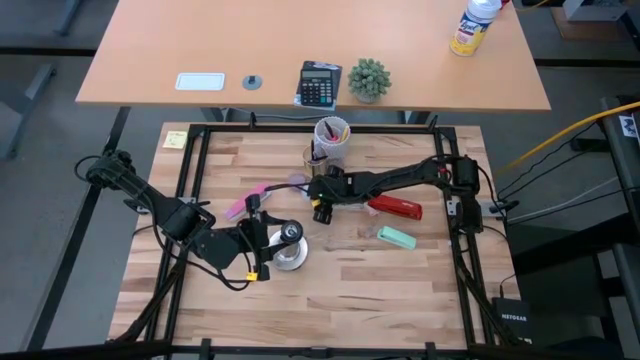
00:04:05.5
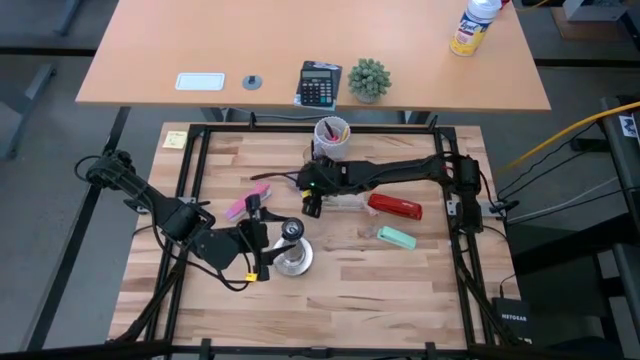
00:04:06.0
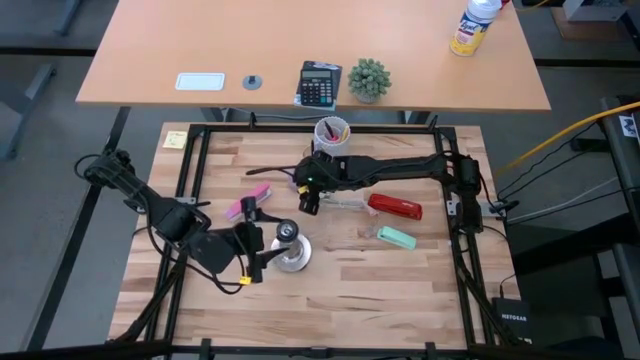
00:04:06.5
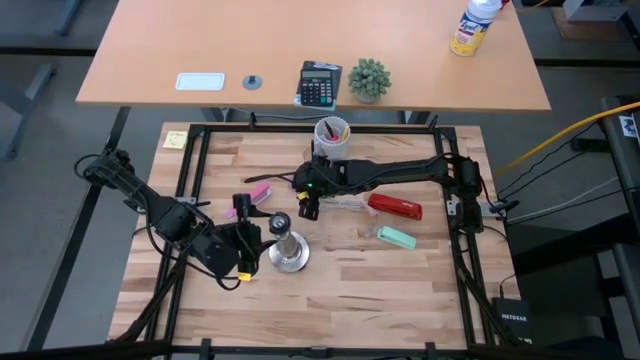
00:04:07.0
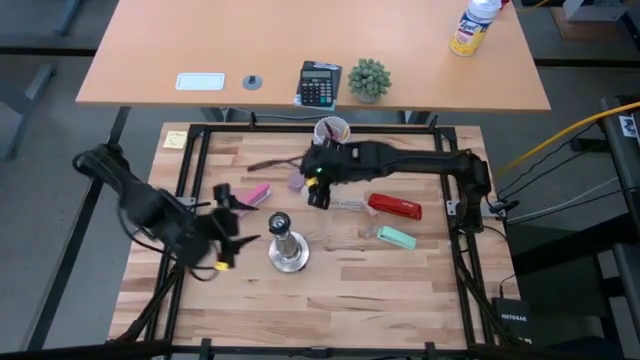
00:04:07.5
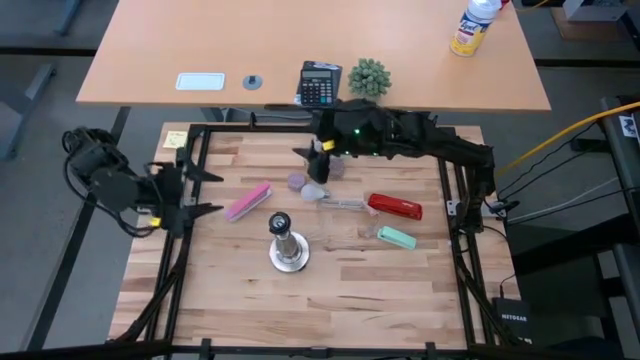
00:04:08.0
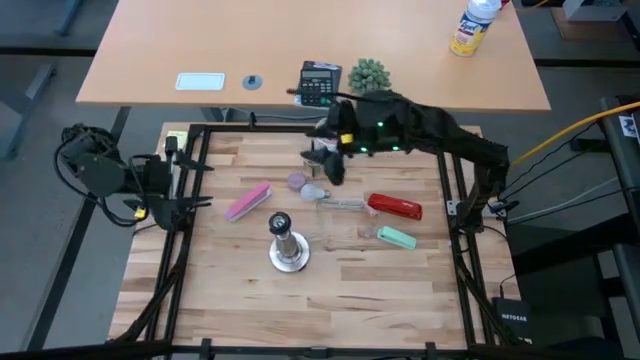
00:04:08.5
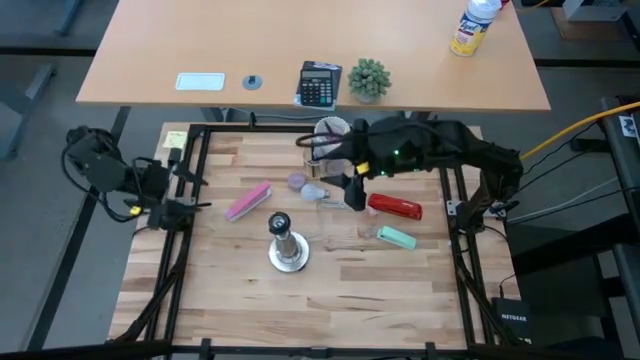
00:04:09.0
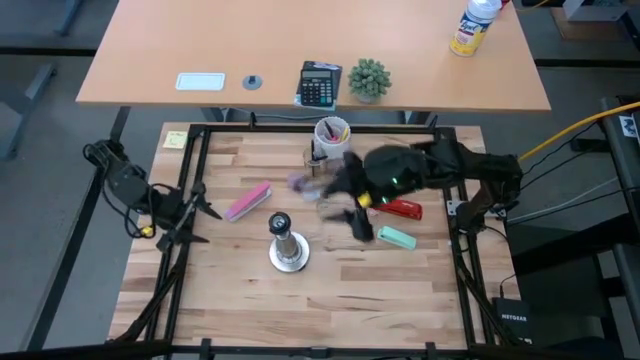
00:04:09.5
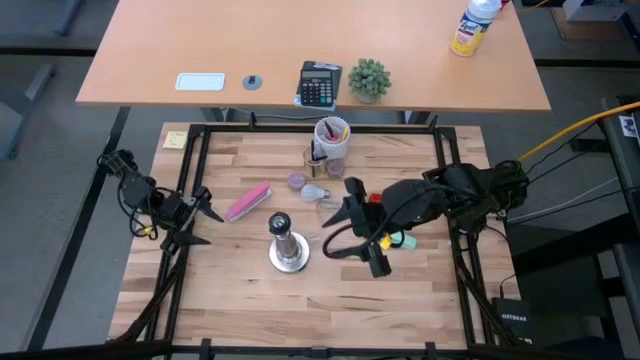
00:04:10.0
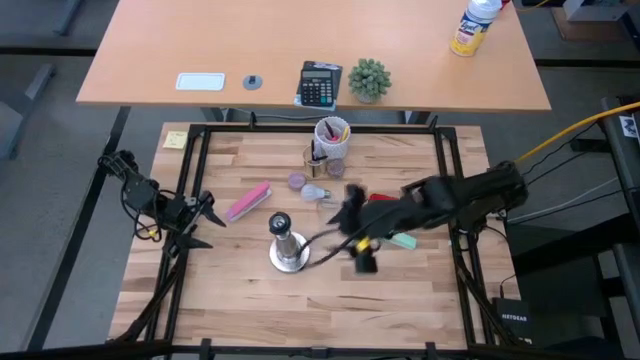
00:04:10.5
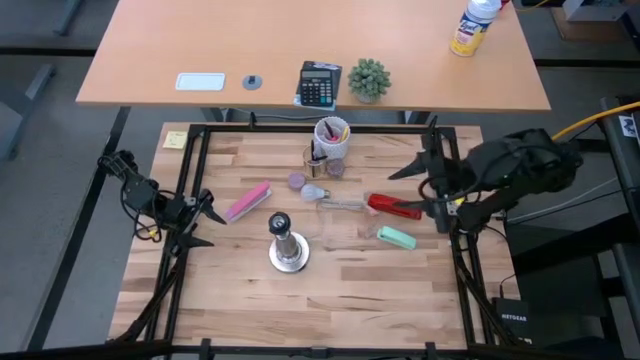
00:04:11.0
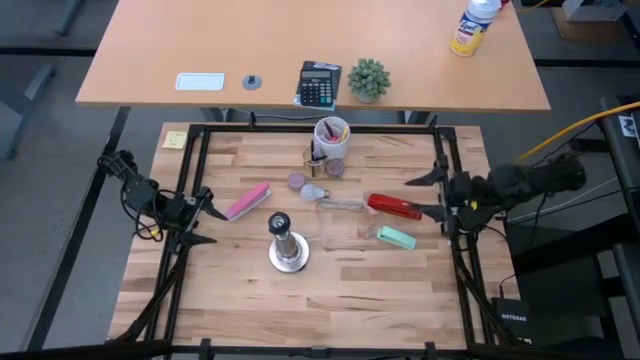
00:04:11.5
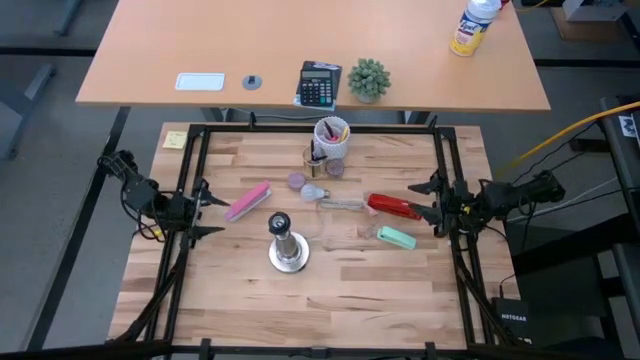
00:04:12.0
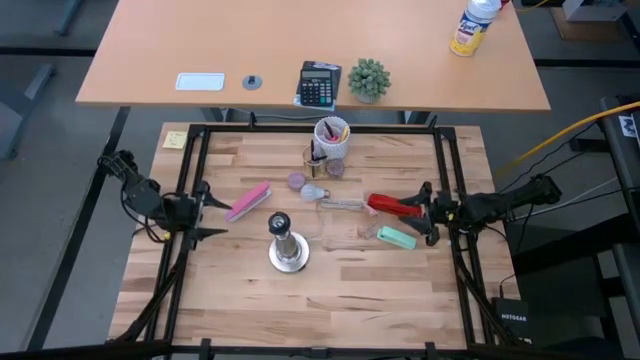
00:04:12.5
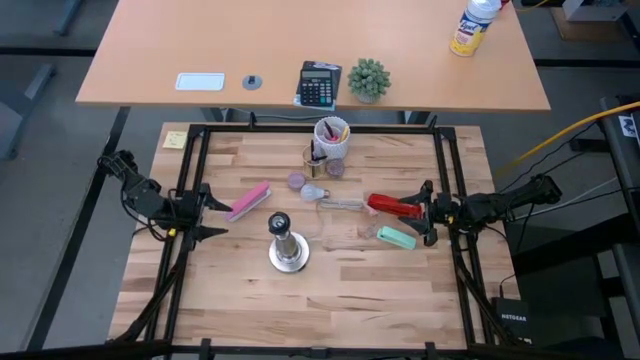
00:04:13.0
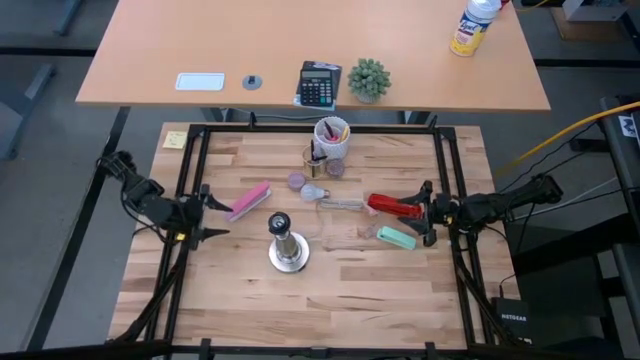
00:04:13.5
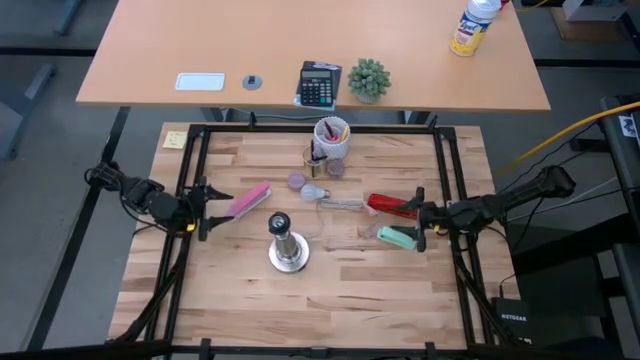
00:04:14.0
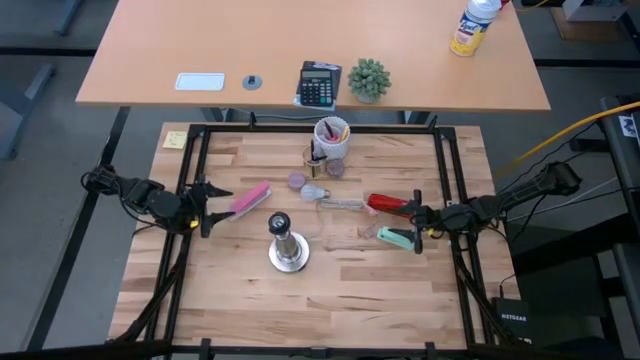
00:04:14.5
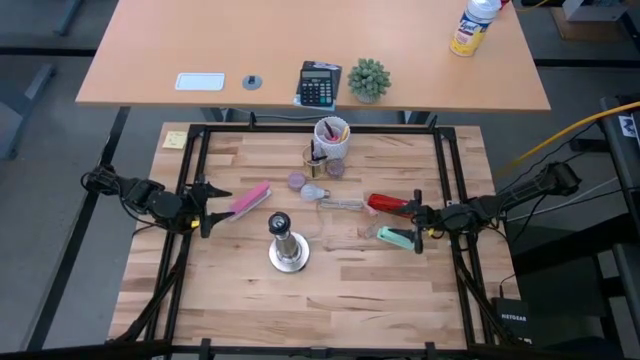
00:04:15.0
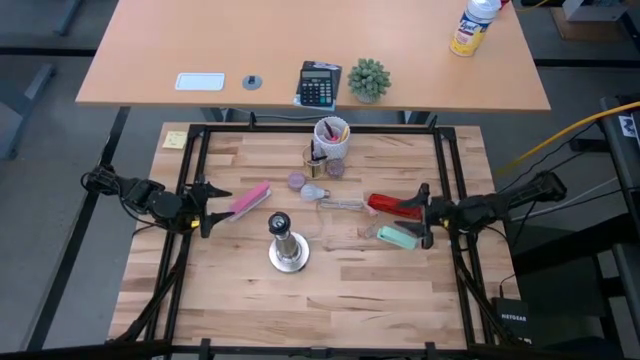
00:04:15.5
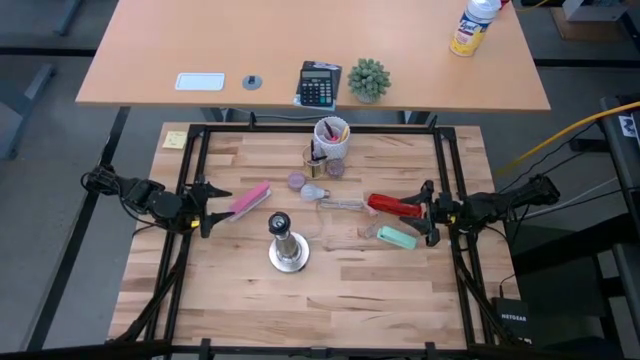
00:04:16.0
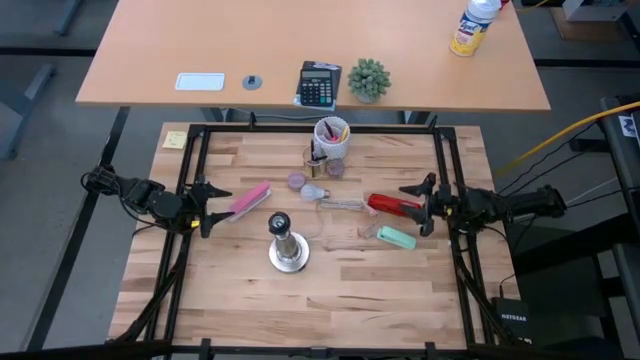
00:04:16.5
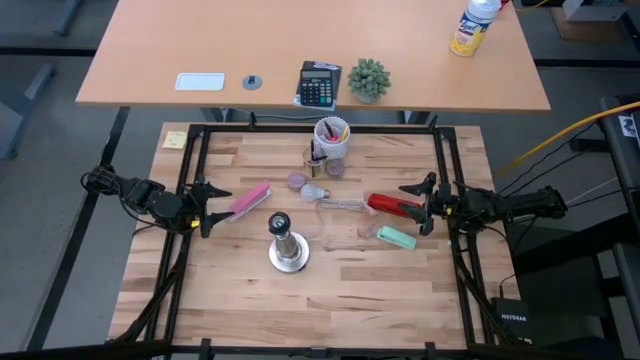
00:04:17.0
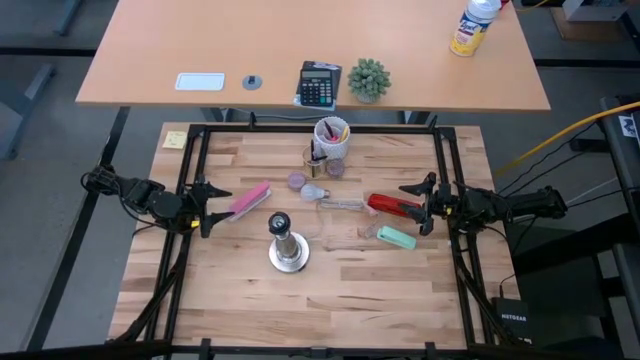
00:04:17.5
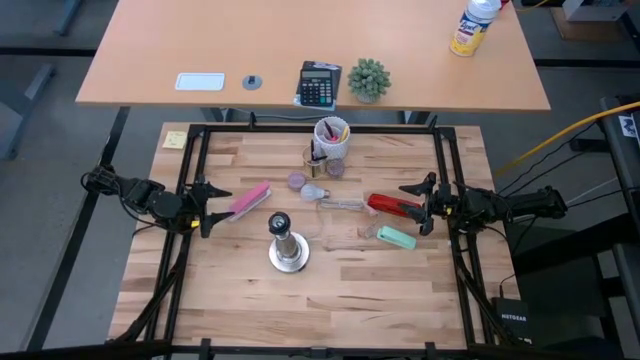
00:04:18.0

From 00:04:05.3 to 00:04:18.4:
Task: Screw lightbulb
Return to Home Position

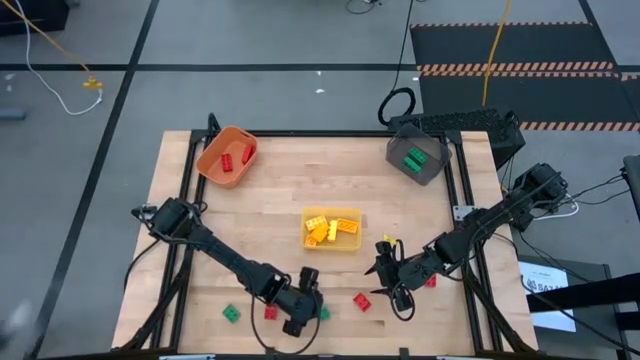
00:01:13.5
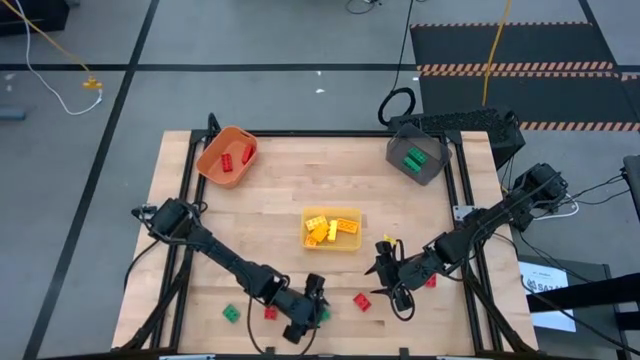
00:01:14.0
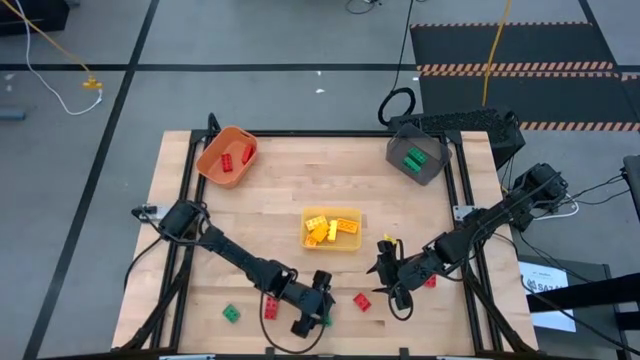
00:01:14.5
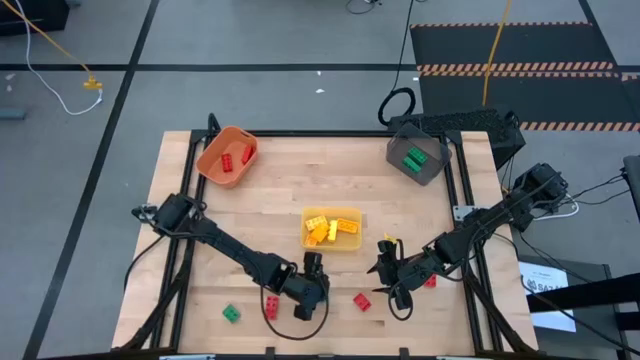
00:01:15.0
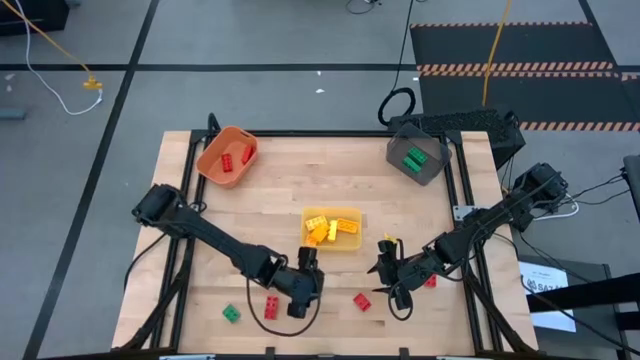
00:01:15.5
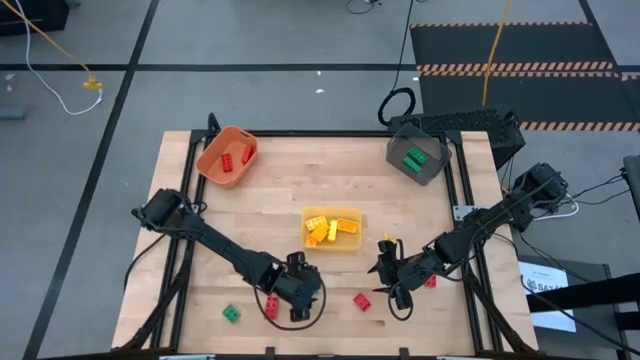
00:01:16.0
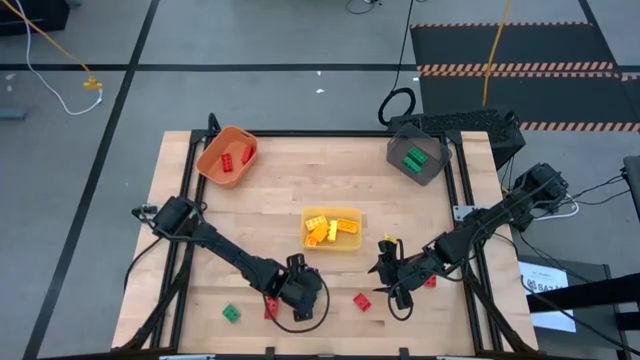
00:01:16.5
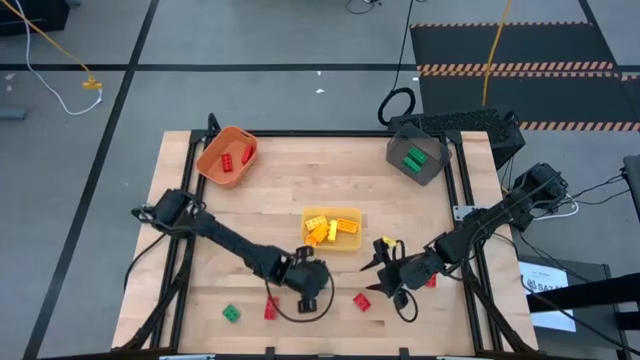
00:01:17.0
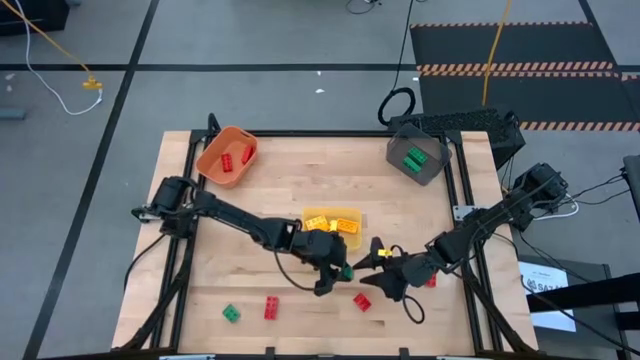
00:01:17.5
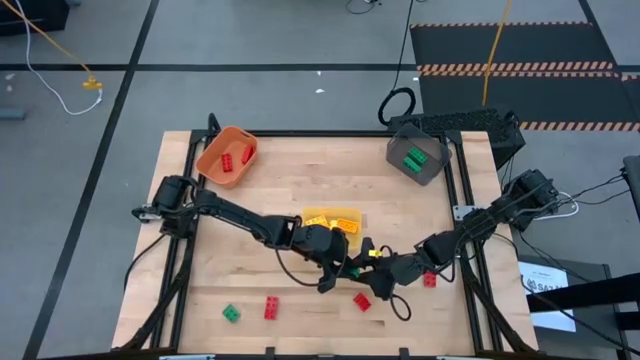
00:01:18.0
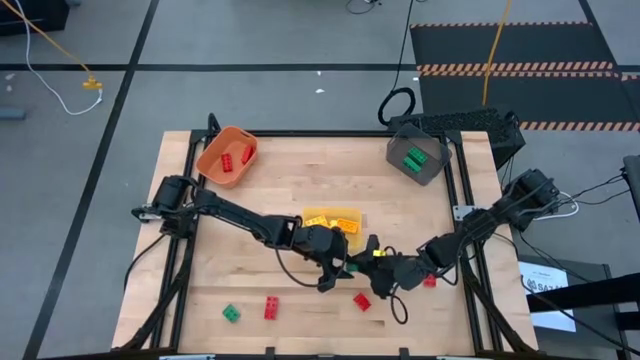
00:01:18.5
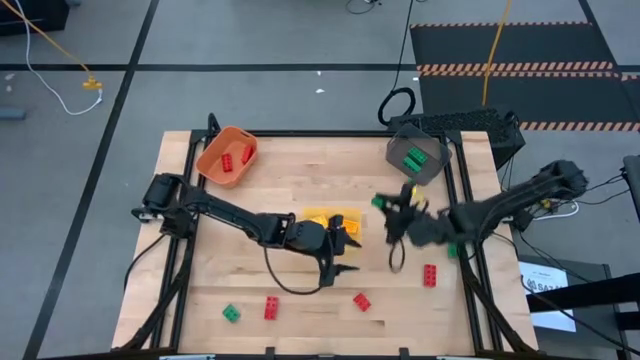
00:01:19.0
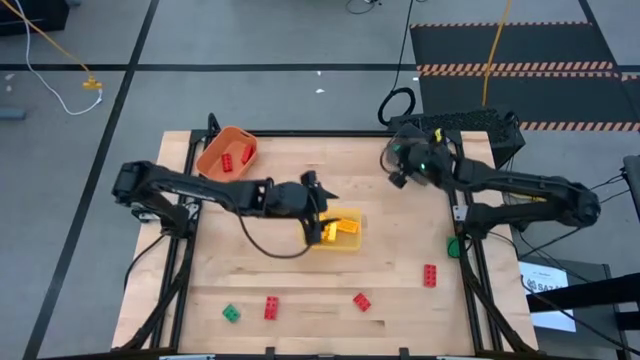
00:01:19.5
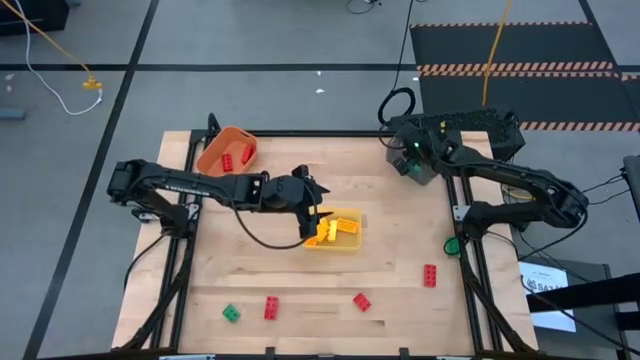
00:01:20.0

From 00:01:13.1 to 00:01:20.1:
Task: Sort & place blocks by color
Put the center green 4-stud game piece into the black bin

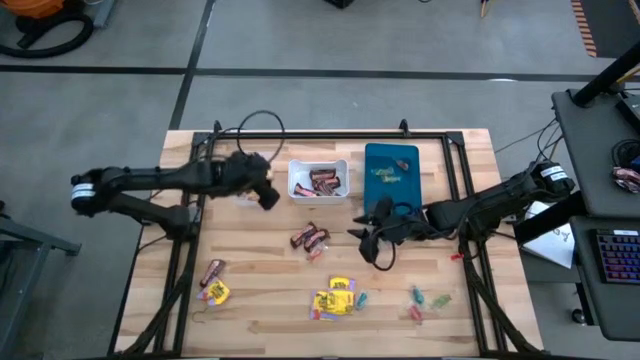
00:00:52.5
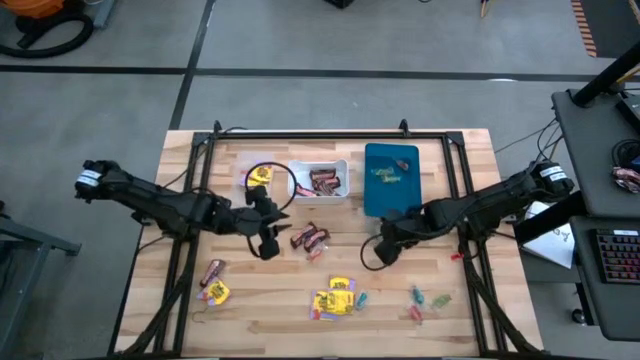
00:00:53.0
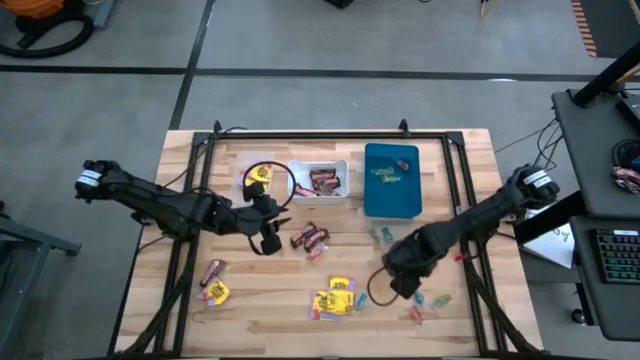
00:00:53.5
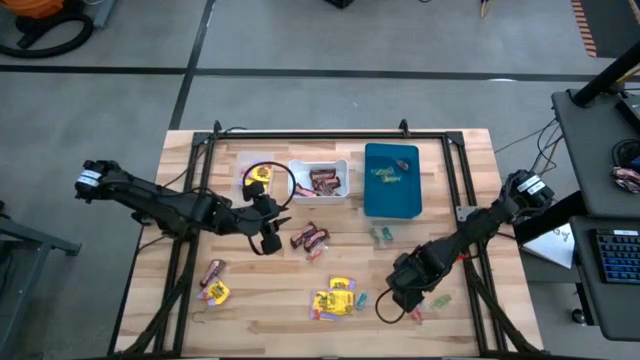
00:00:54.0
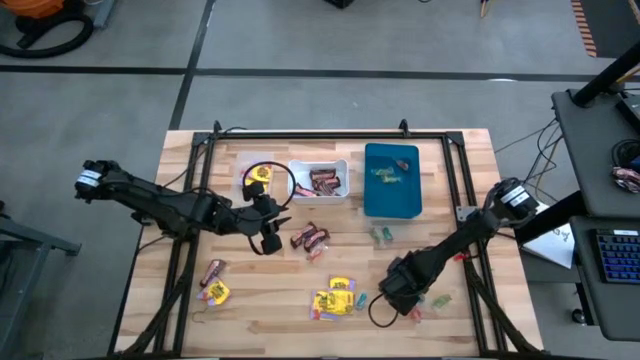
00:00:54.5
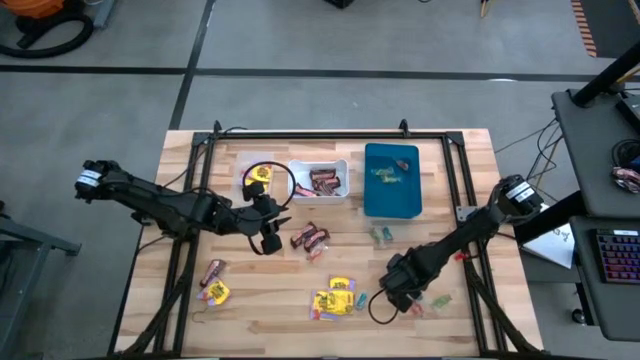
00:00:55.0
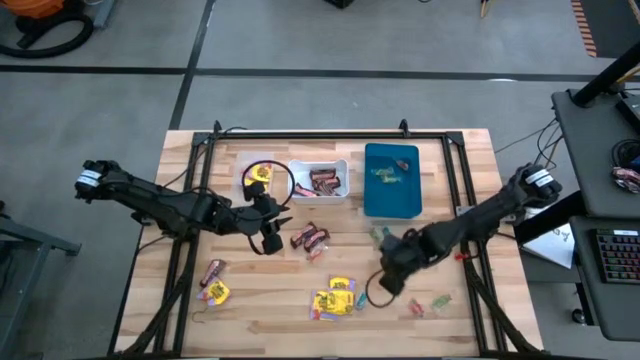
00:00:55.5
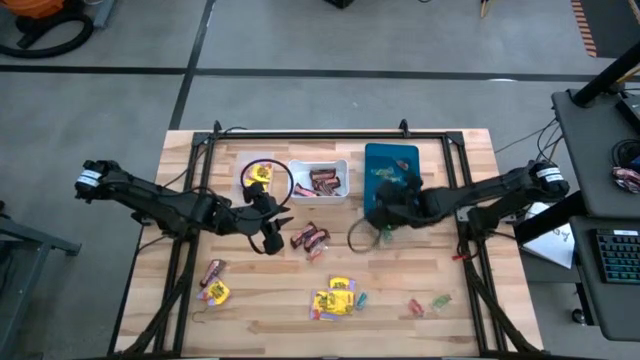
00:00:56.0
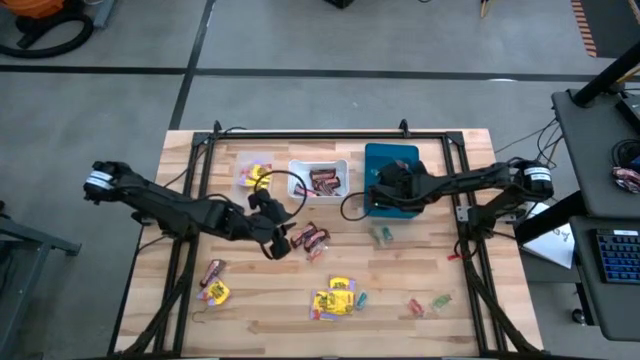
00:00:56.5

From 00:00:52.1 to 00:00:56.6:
Task: Sort candy
Put the blue candy into the blue bin
